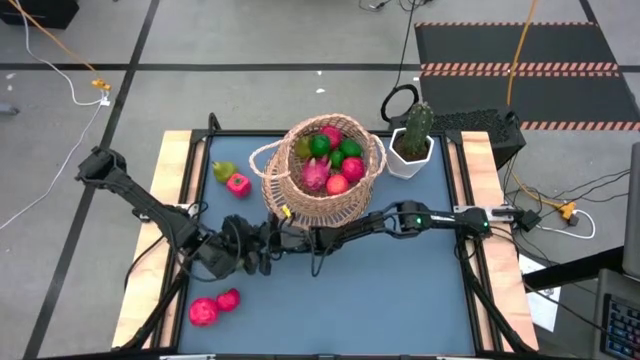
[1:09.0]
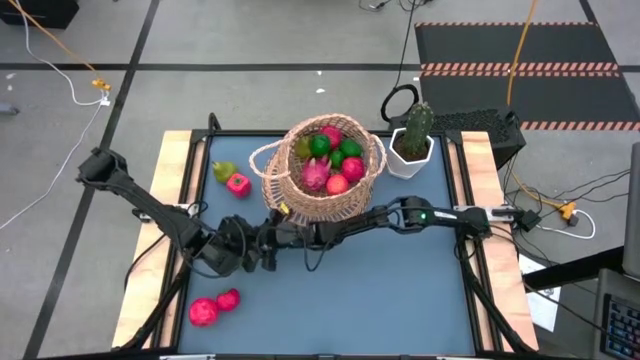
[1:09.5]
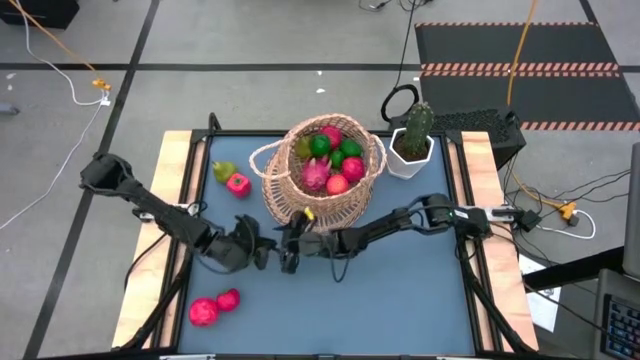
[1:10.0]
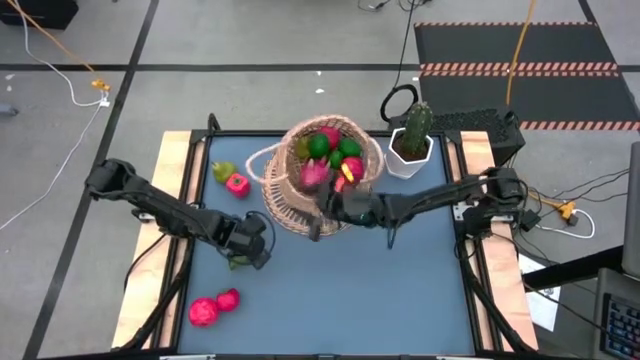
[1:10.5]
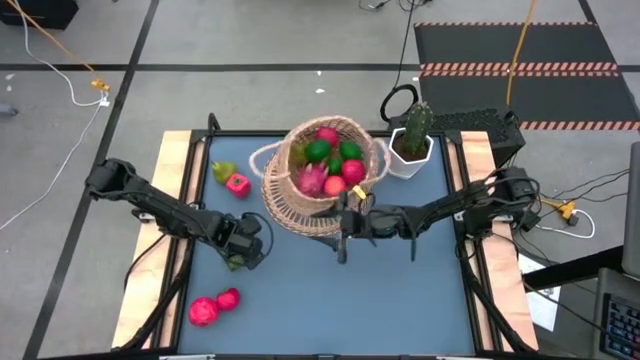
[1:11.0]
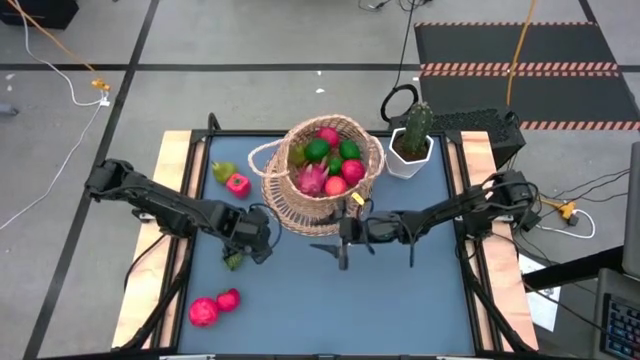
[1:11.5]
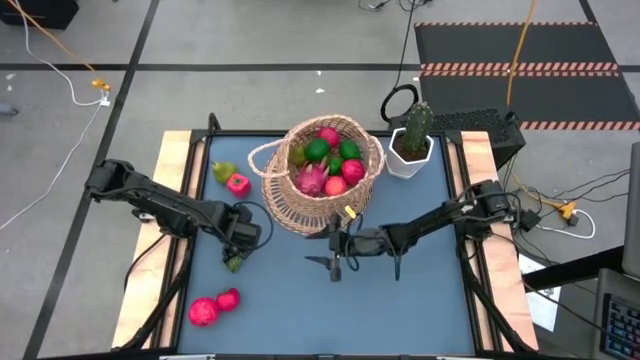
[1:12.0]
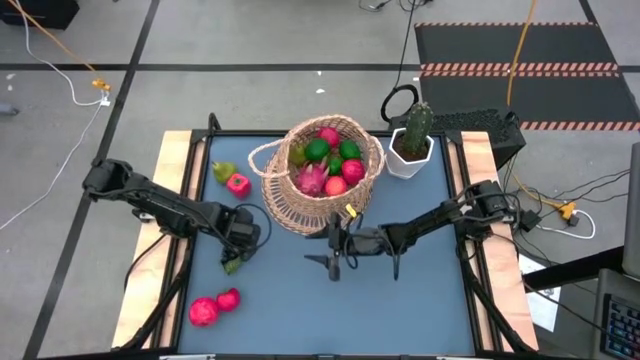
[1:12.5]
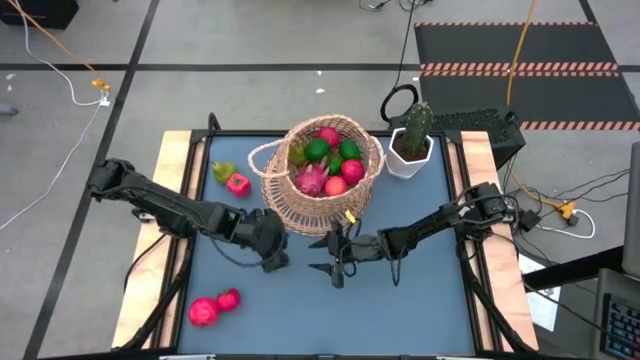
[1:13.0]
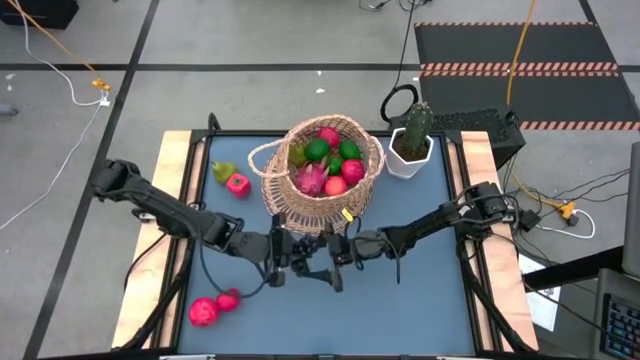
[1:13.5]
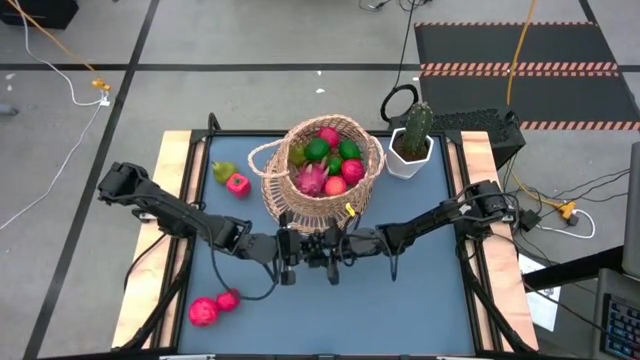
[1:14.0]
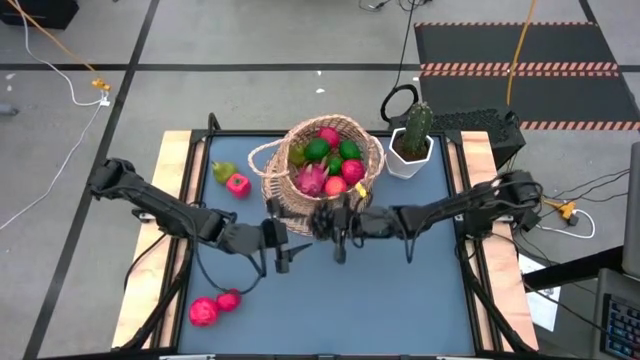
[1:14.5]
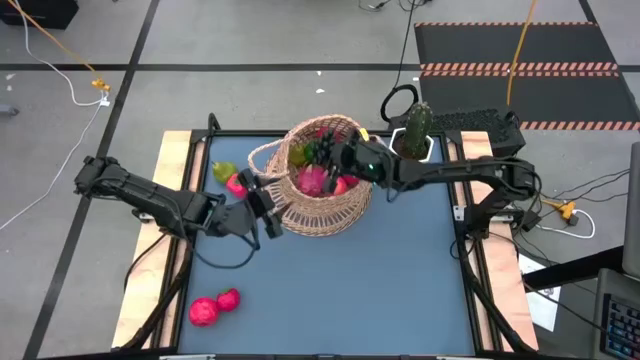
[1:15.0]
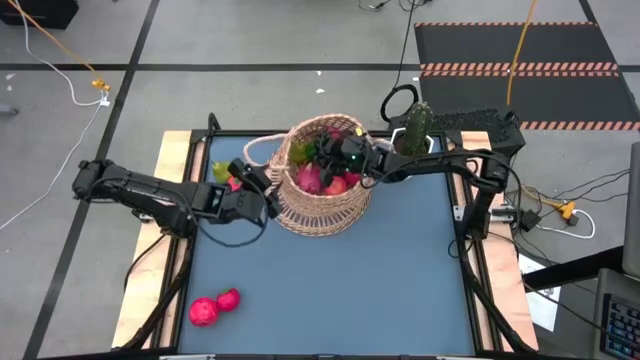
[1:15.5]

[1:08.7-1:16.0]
Task: Build produce basket
Put the grapes into the basket

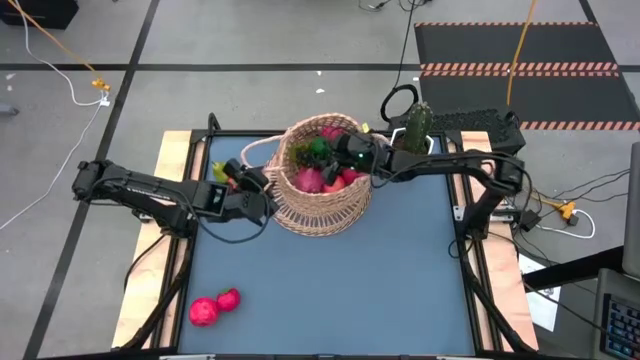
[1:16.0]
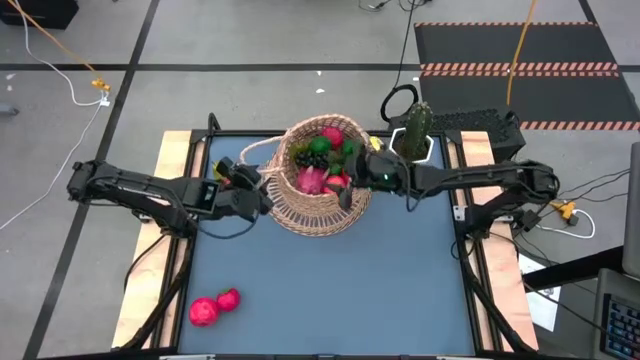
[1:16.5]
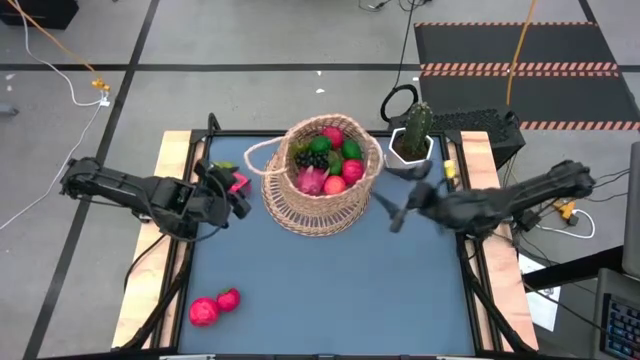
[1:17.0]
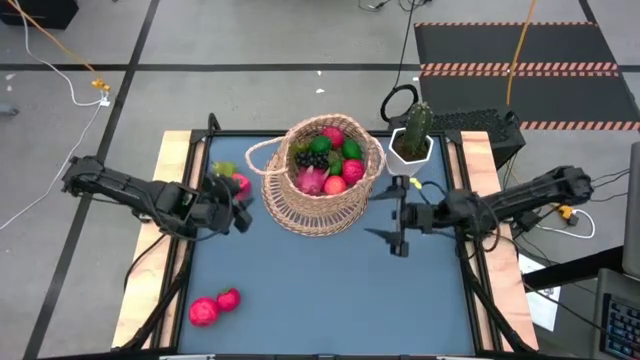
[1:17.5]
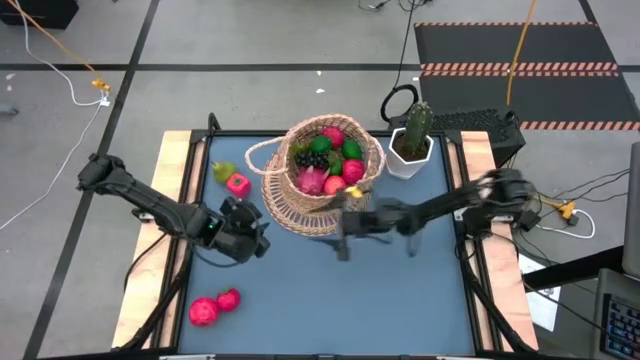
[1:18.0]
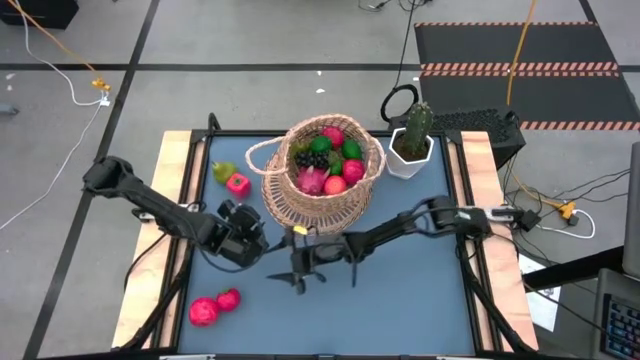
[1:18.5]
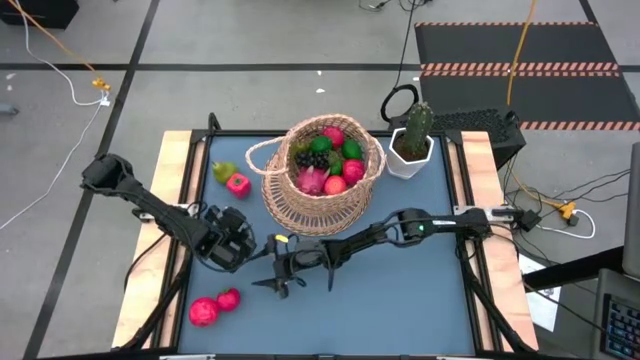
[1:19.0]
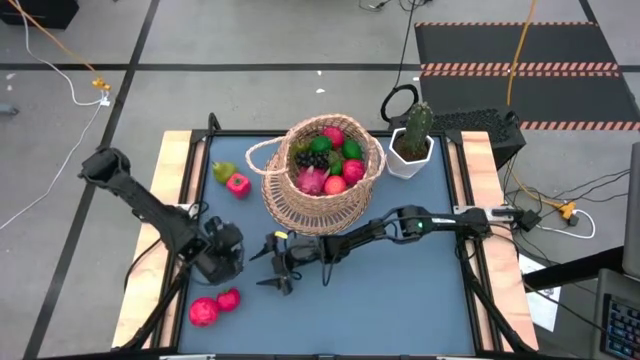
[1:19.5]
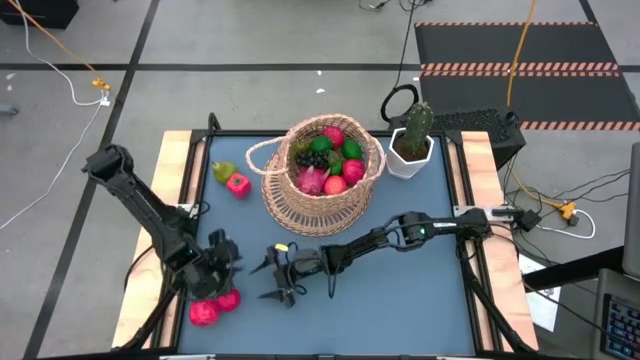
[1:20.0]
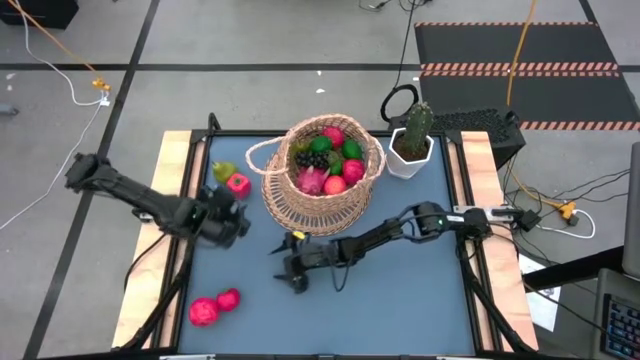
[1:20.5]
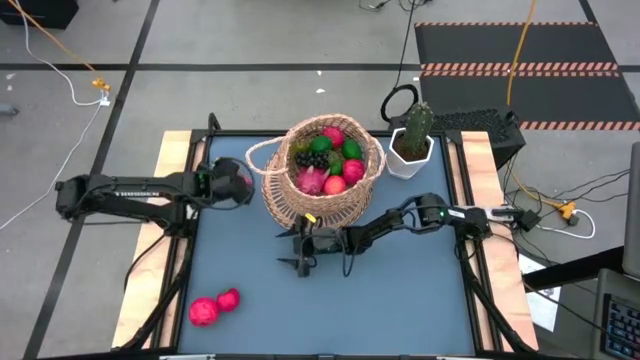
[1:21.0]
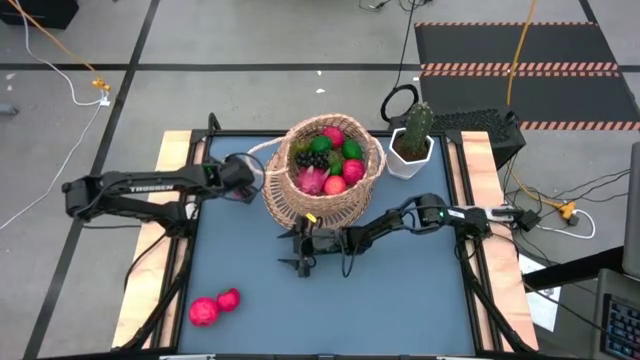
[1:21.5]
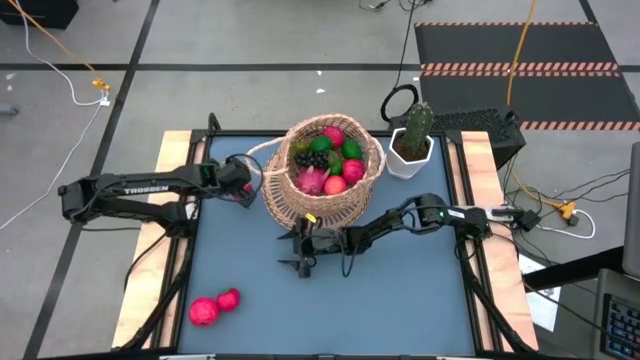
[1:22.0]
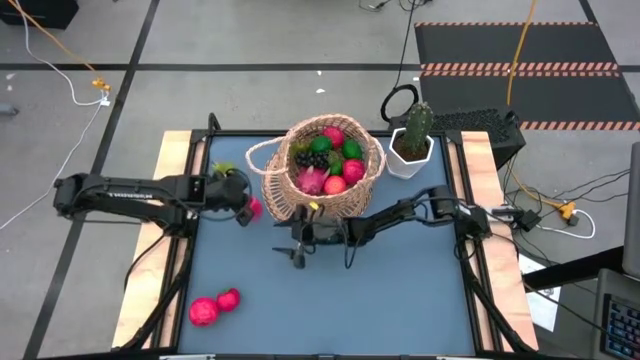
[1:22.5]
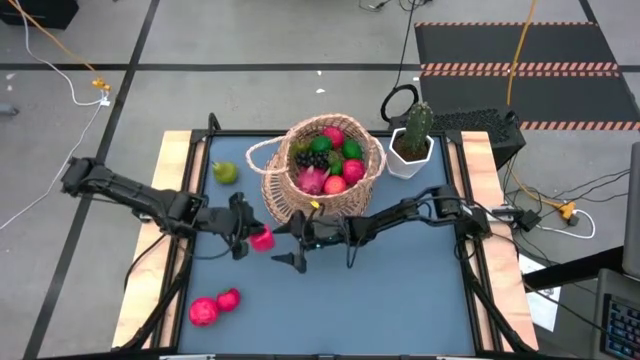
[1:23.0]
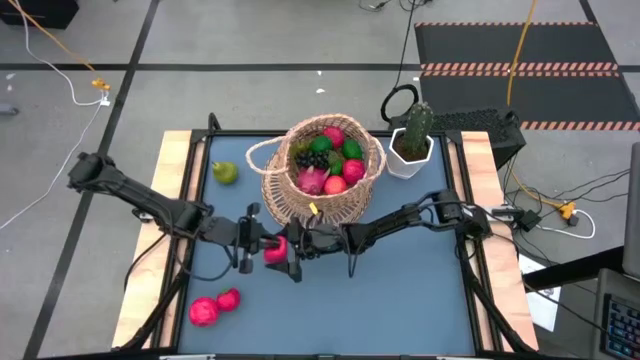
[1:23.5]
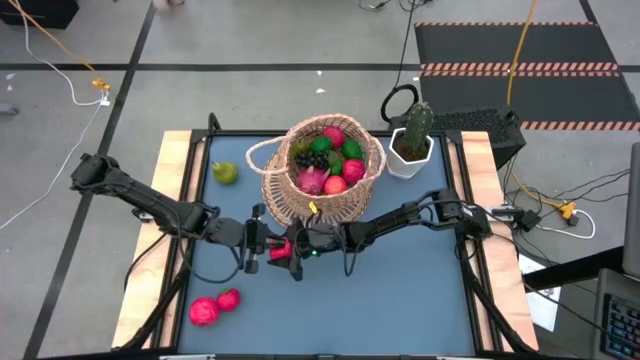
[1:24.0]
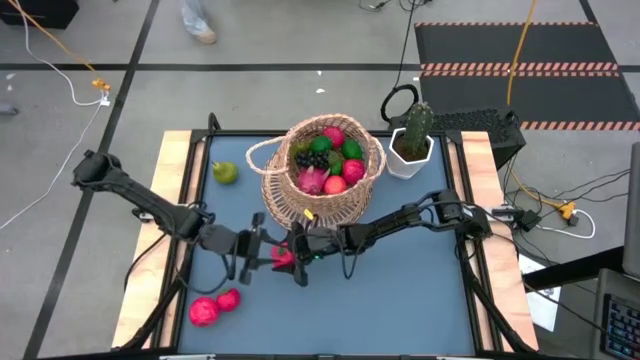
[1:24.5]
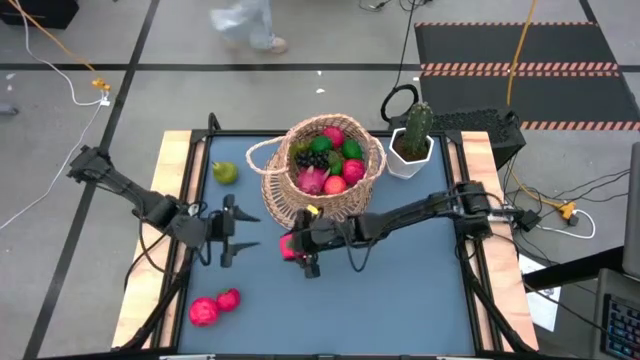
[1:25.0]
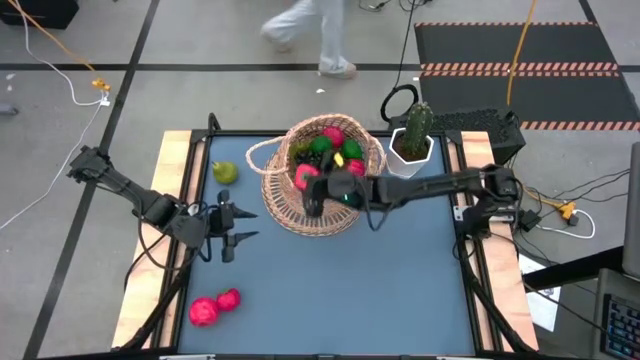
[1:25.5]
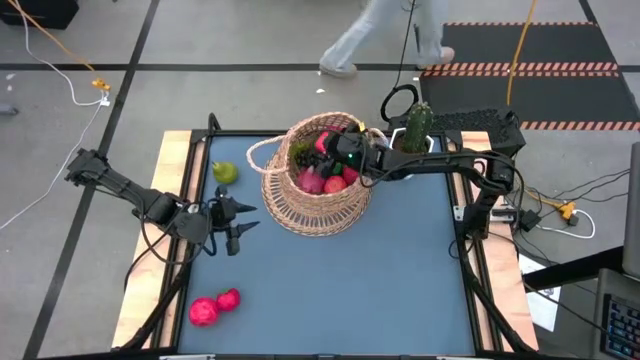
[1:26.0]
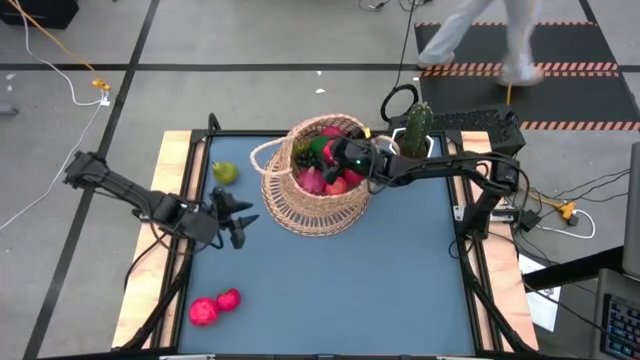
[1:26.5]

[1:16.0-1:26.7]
Put the bell pepper into the basket

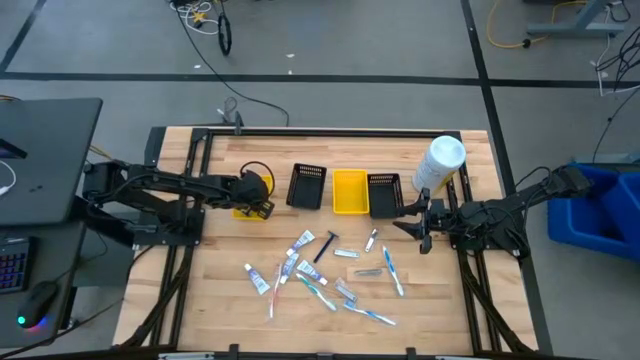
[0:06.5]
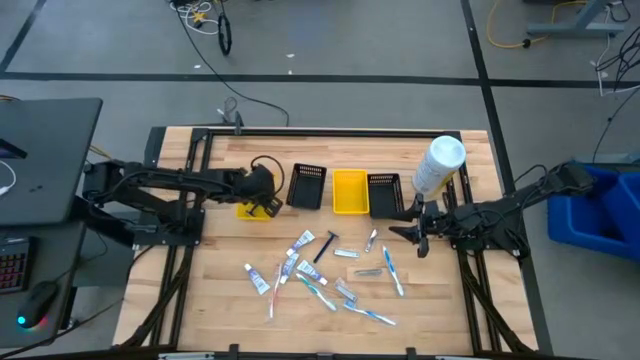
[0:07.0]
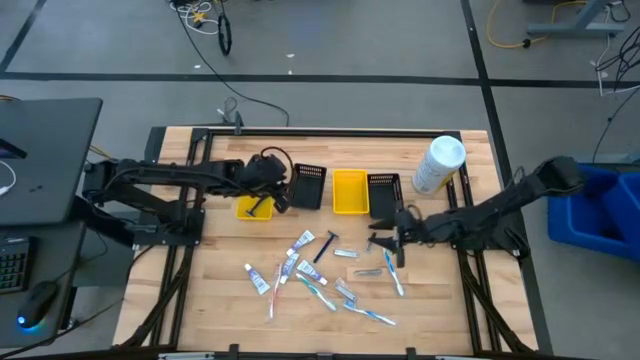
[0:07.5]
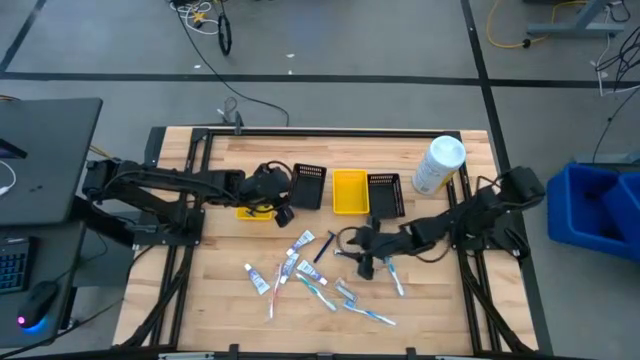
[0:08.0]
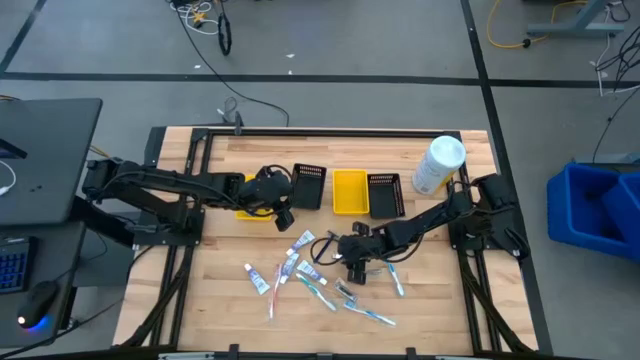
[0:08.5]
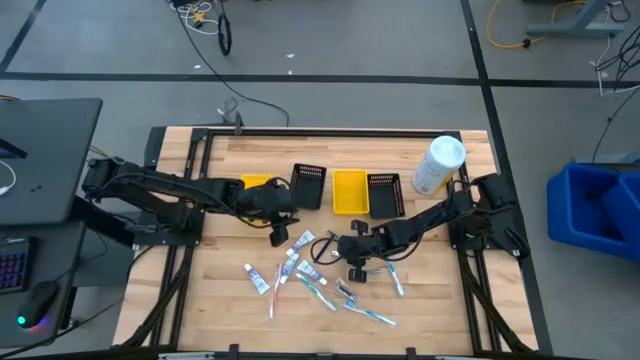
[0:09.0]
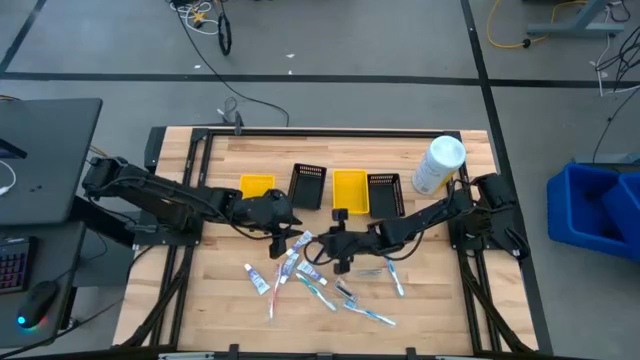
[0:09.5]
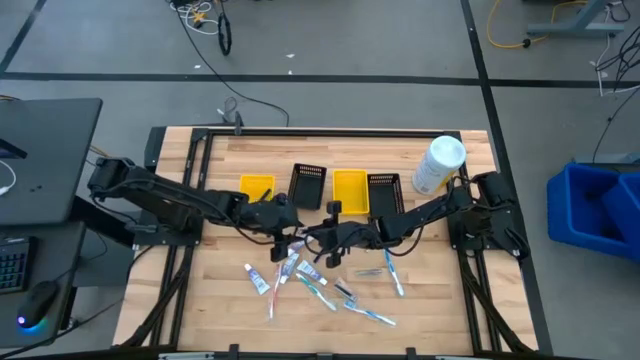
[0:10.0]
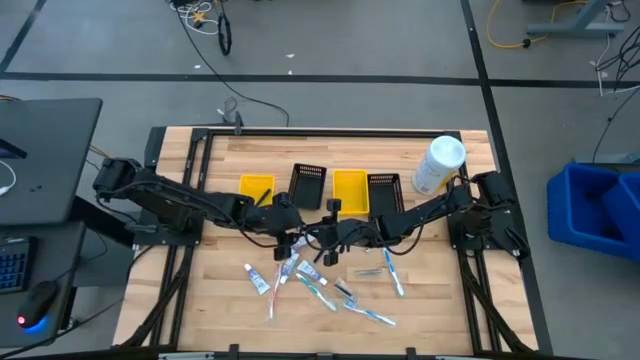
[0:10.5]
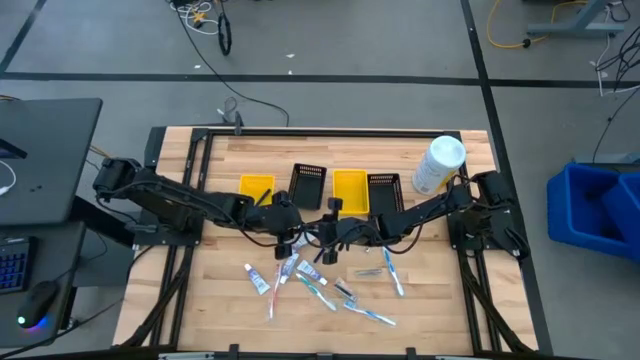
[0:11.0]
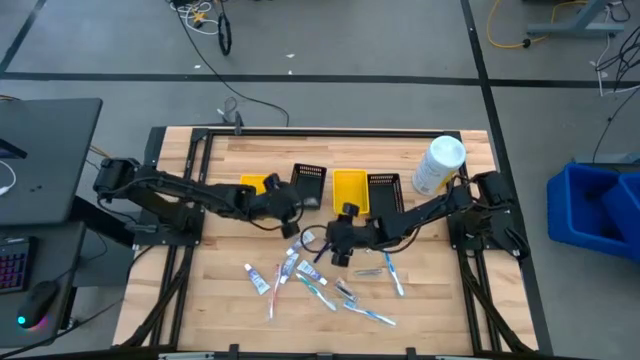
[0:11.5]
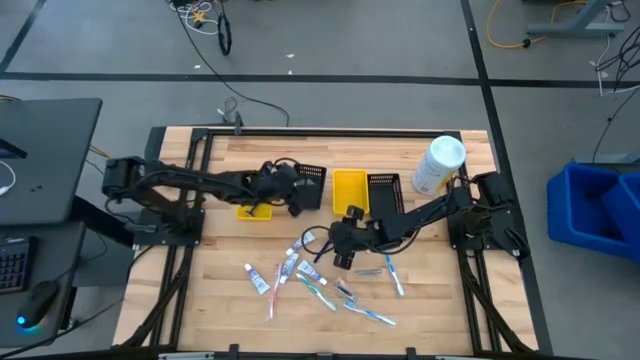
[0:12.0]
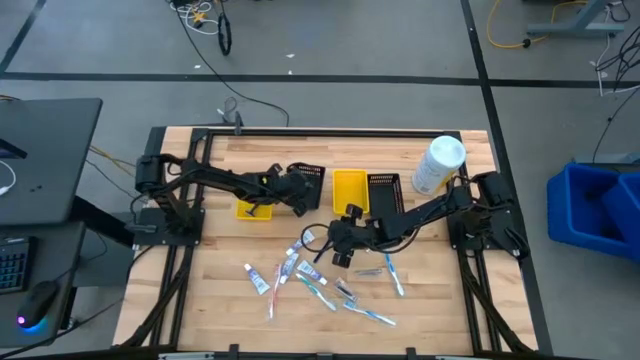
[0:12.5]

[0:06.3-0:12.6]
Task: Pick & Place Travel size toiletries
Put the silver nail cutter into the left black bin
